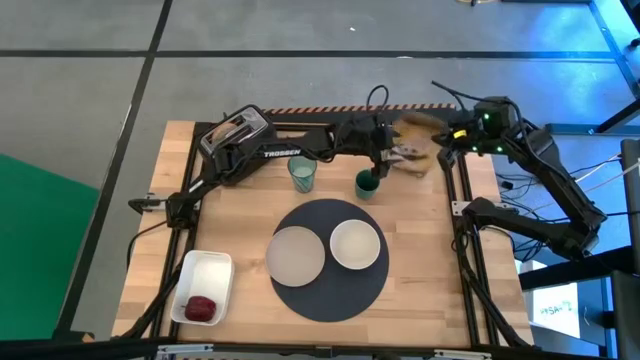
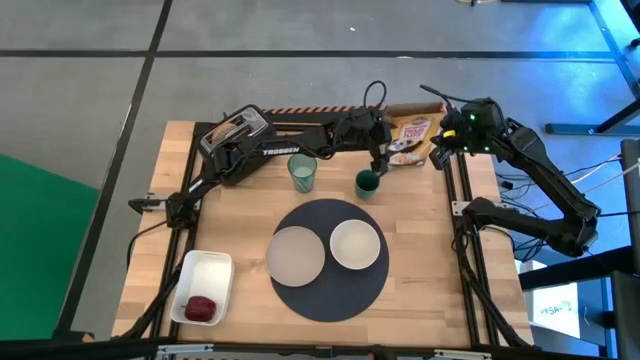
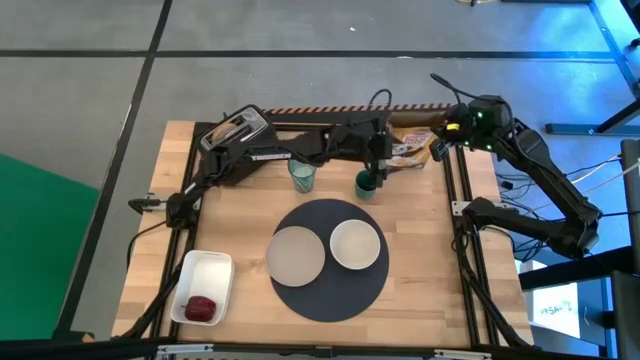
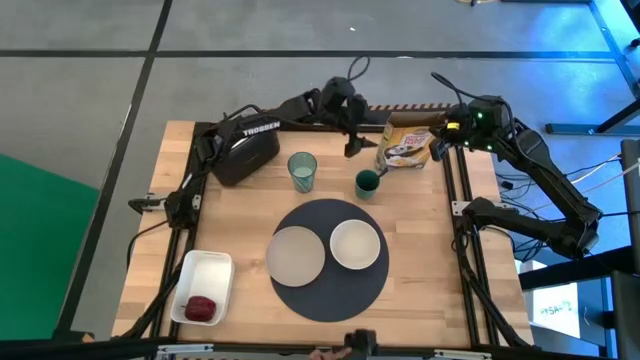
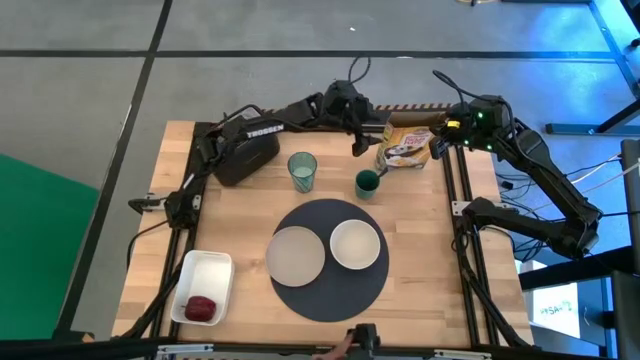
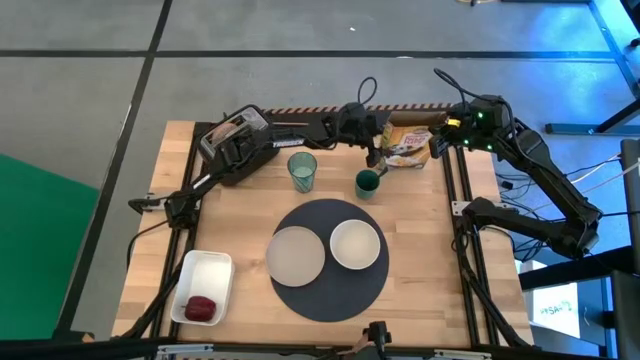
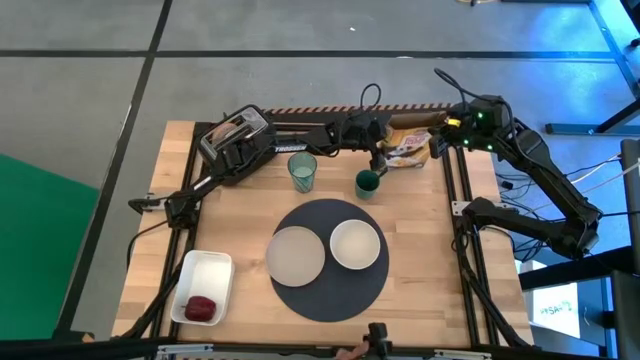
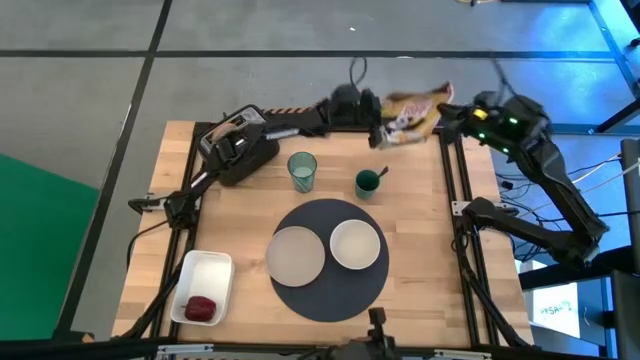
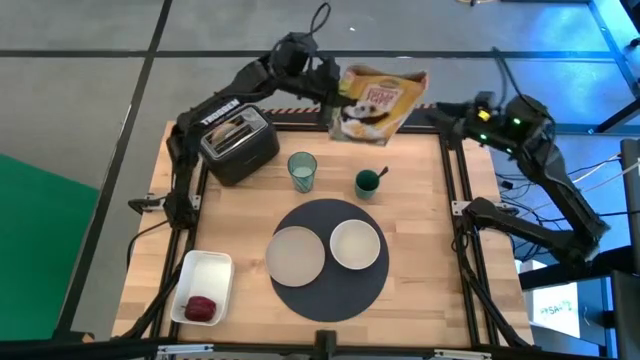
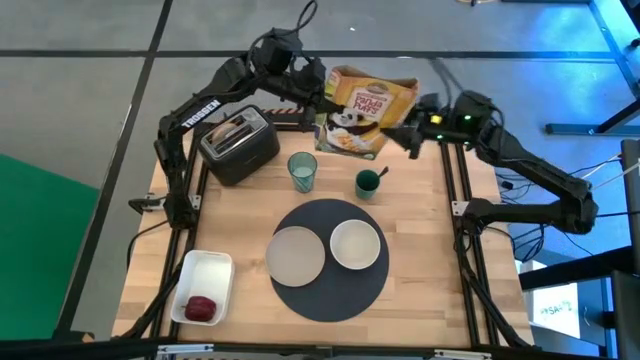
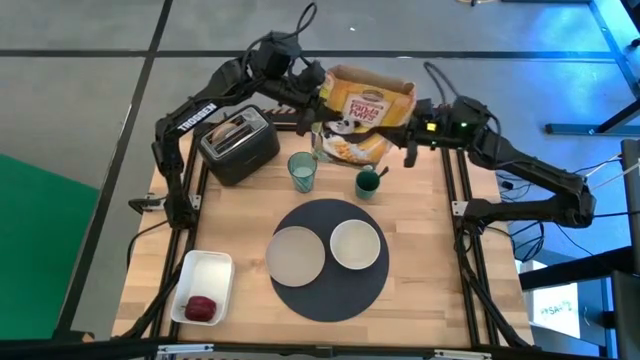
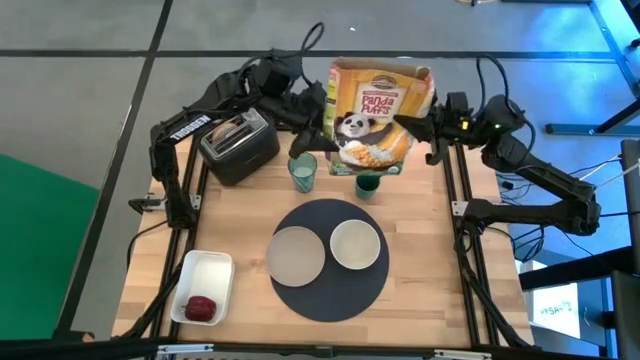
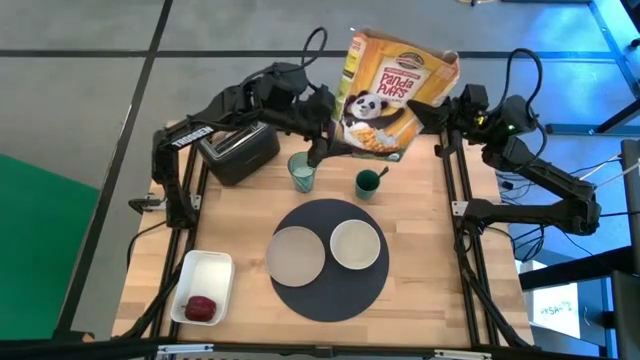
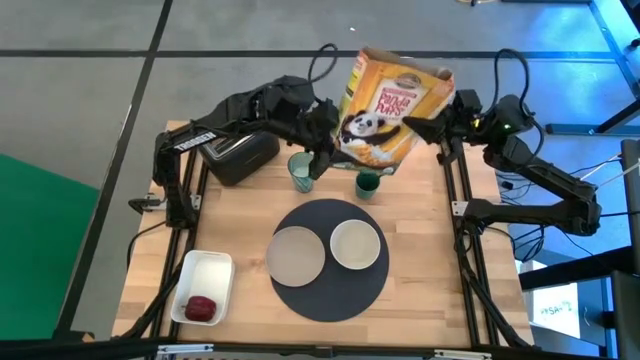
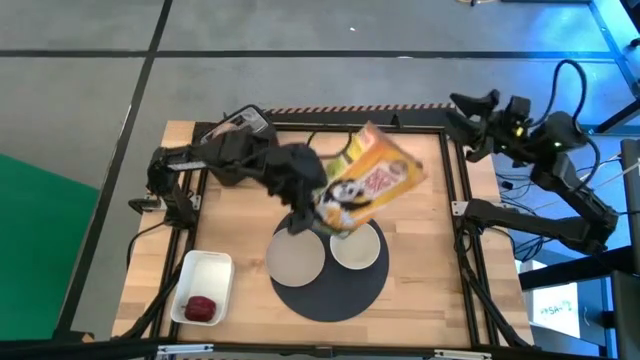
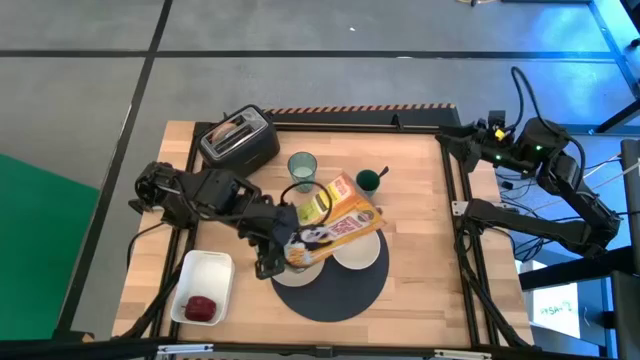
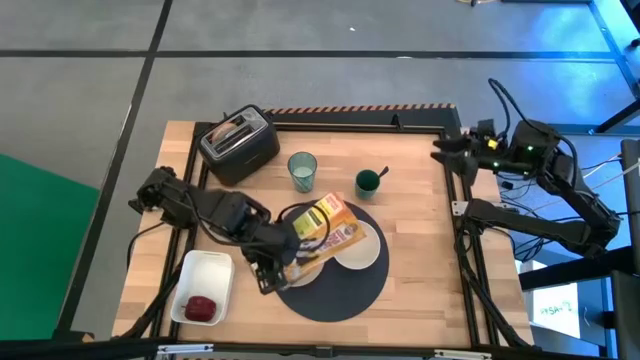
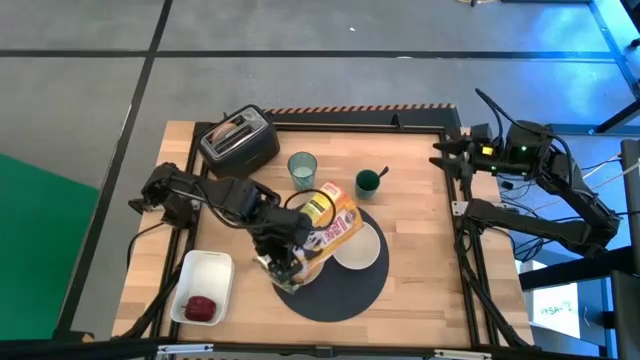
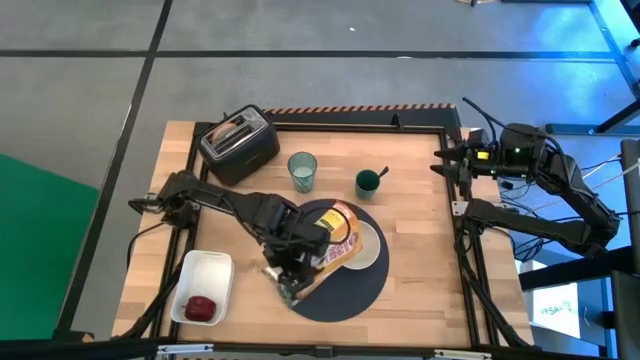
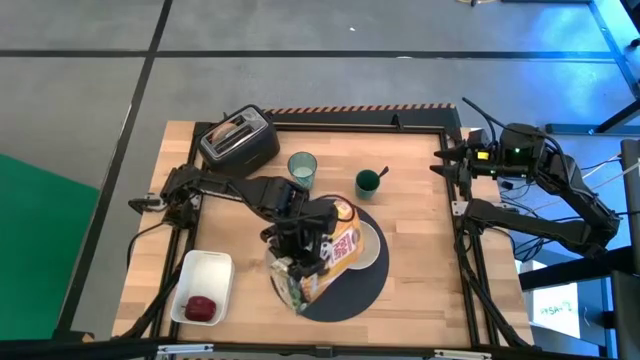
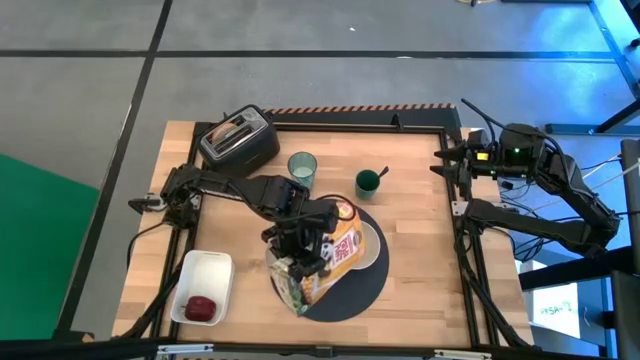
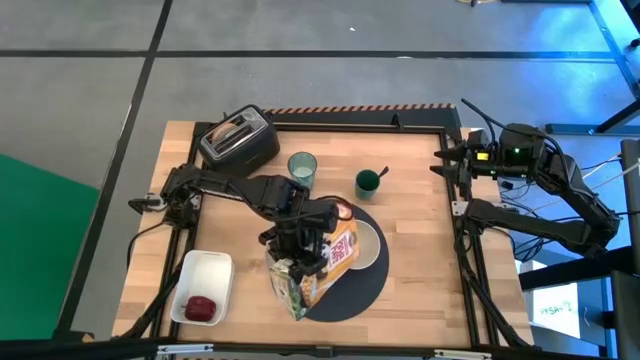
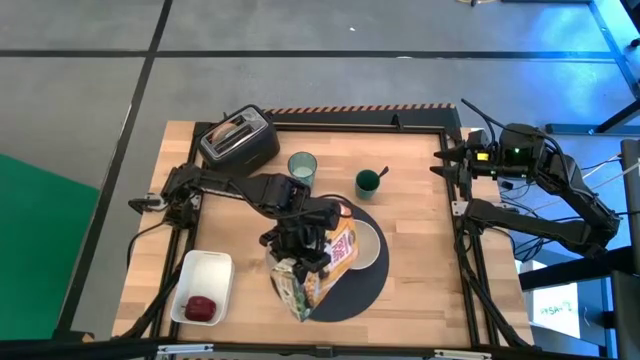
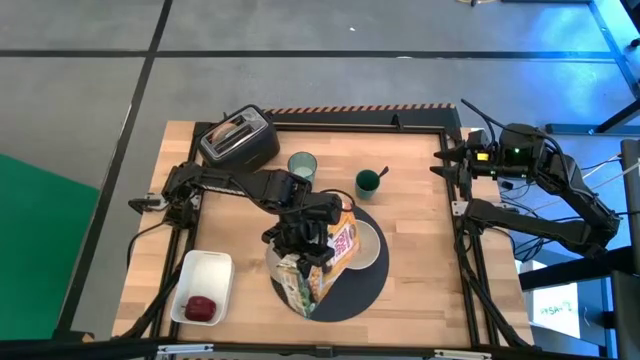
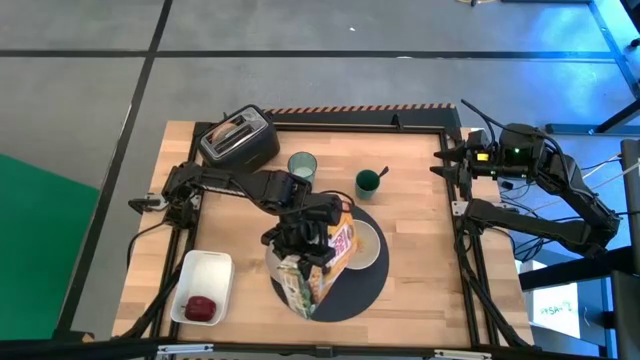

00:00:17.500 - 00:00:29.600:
Task: Arrange a breakfast setting
Pour the cereals from the cereal box into the white bowl

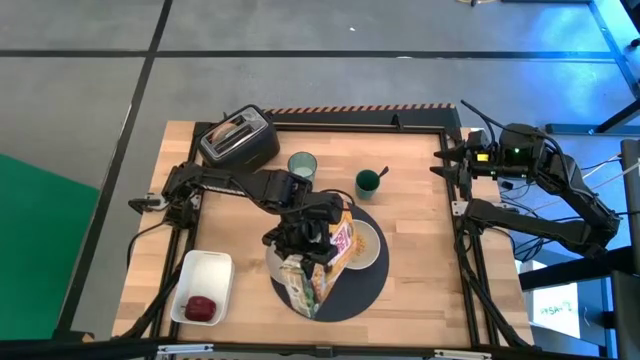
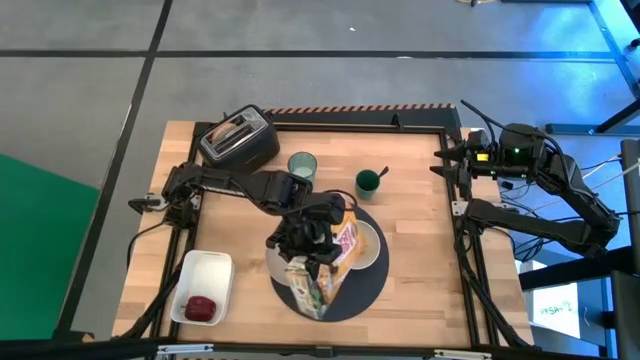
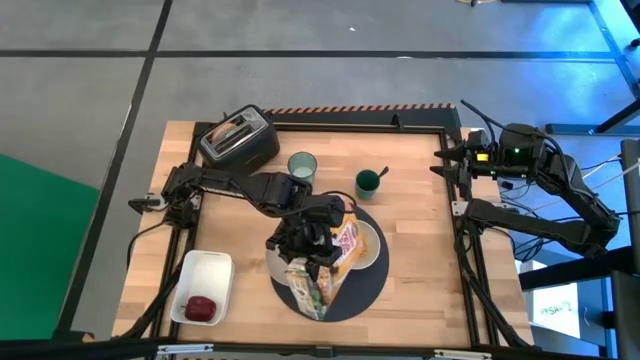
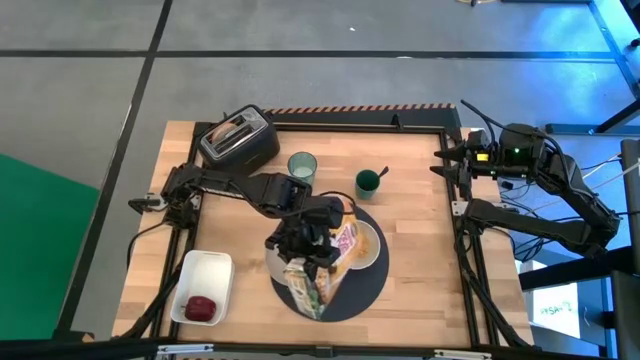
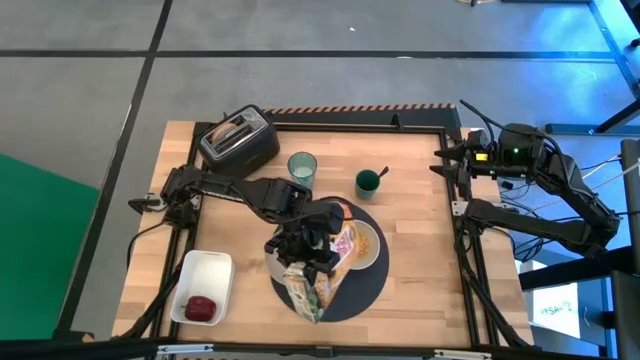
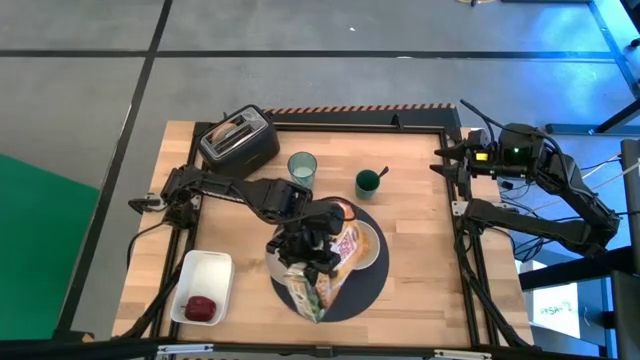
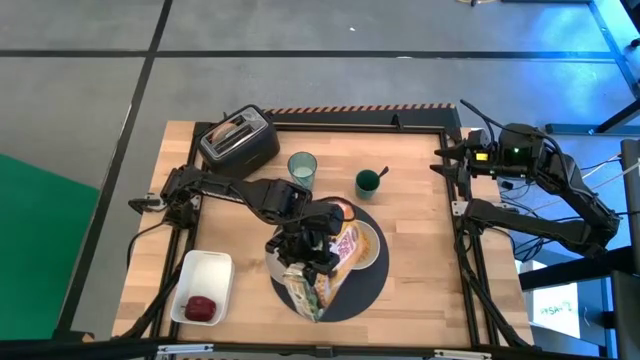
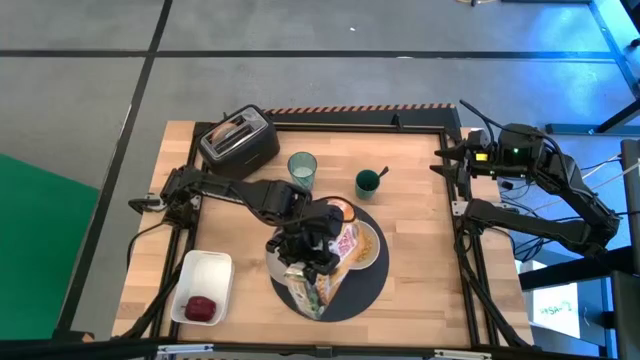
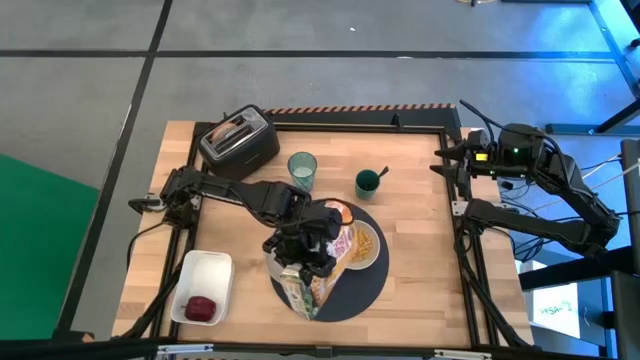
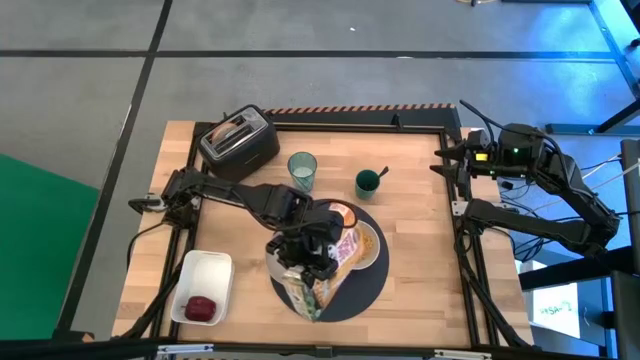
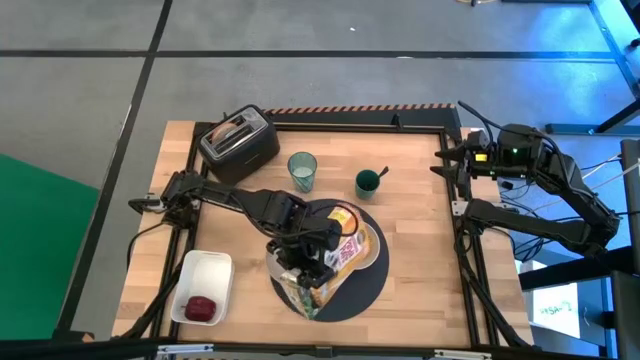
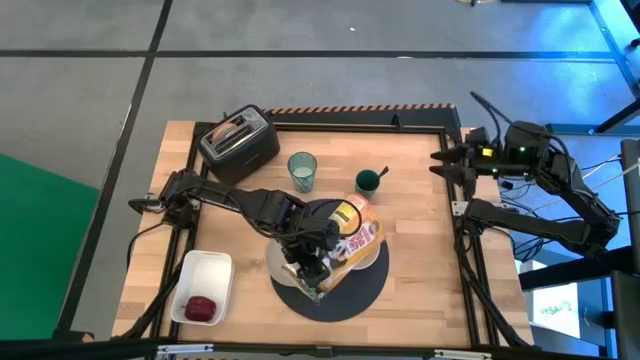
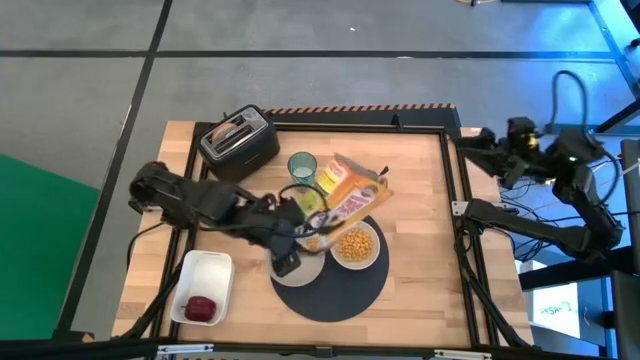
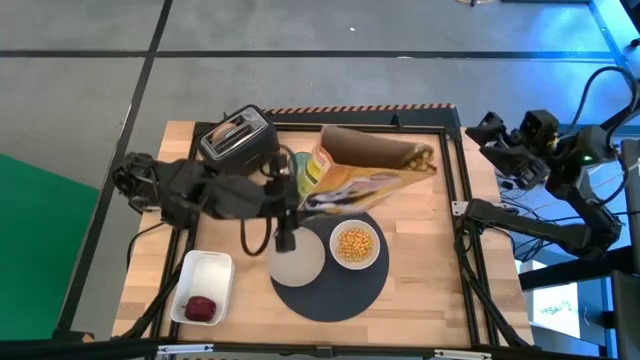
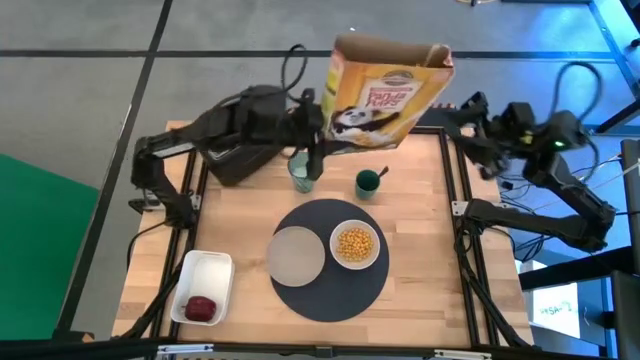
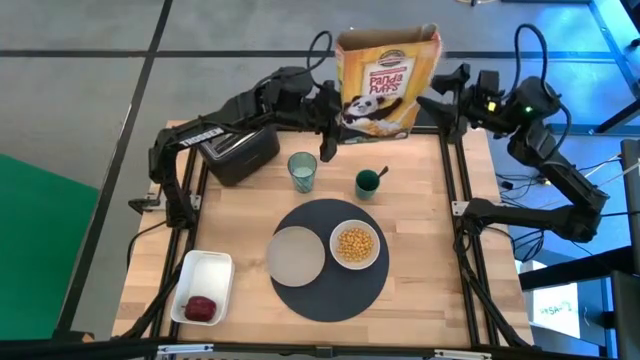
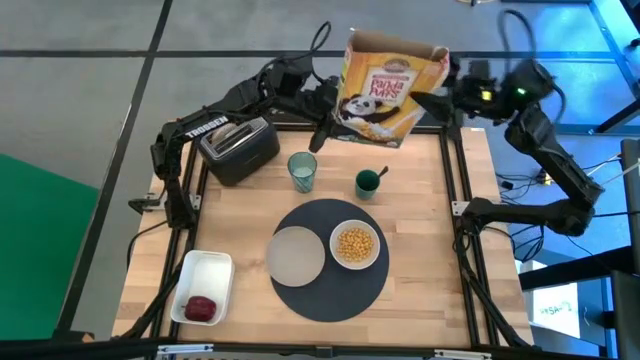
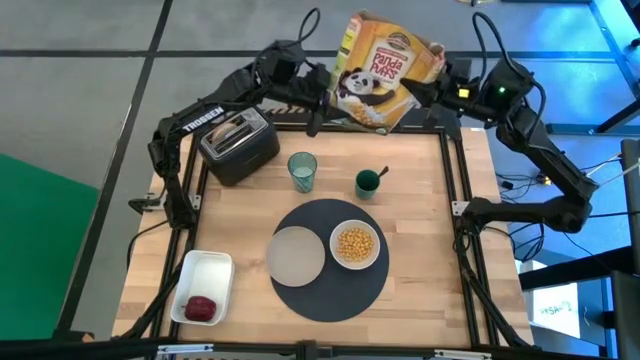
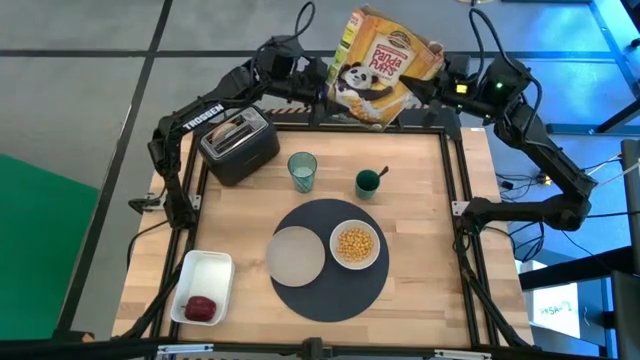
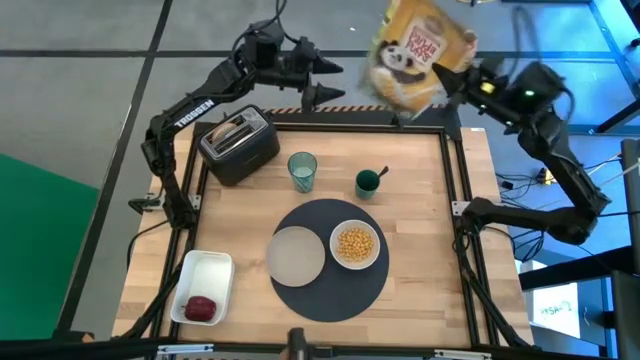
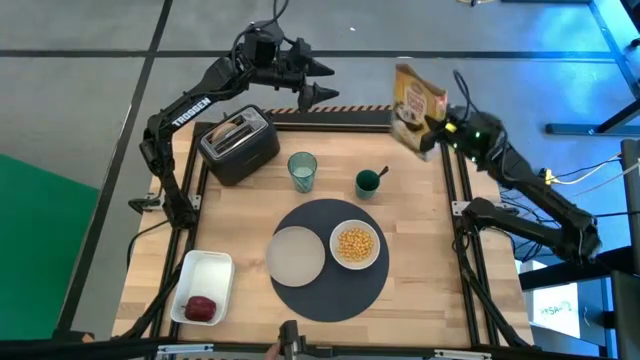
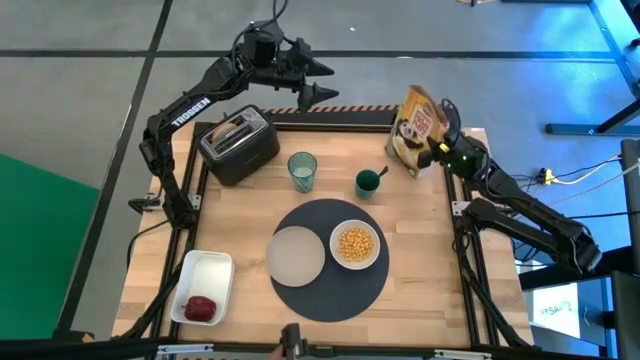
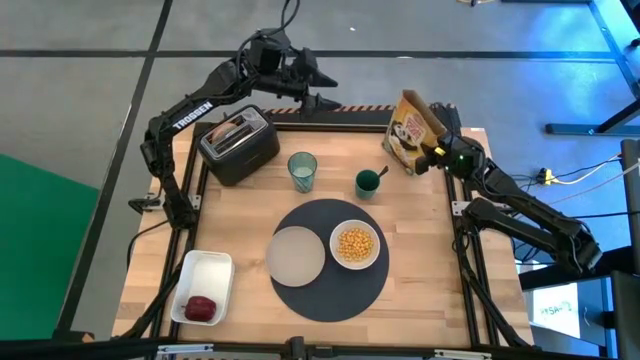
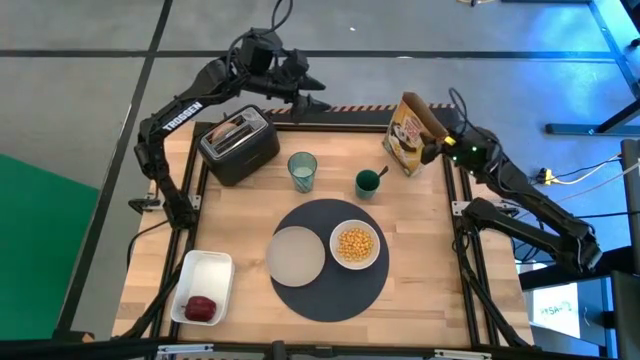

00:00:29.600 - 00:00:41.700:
Pour the cereals from the cereal box into the white bowl
